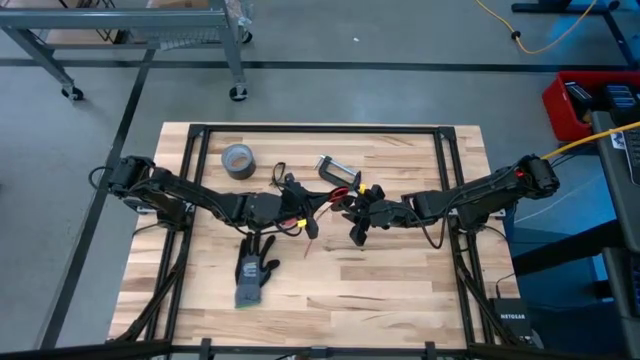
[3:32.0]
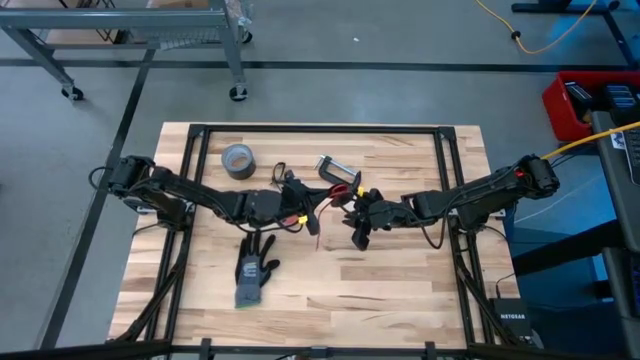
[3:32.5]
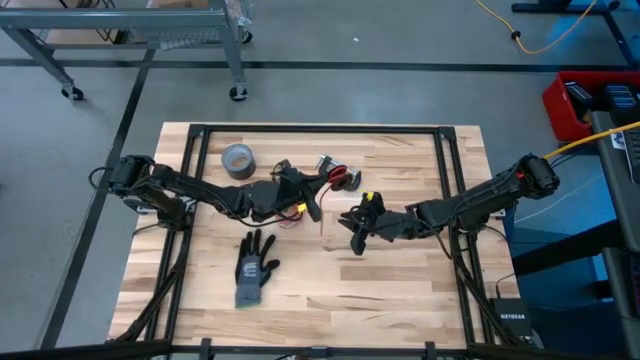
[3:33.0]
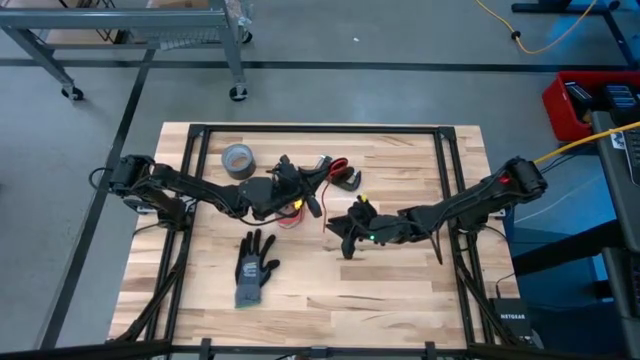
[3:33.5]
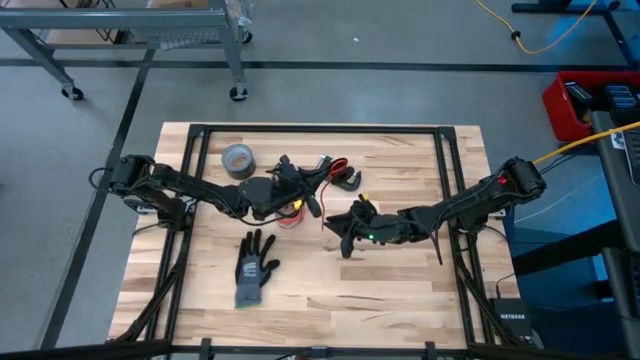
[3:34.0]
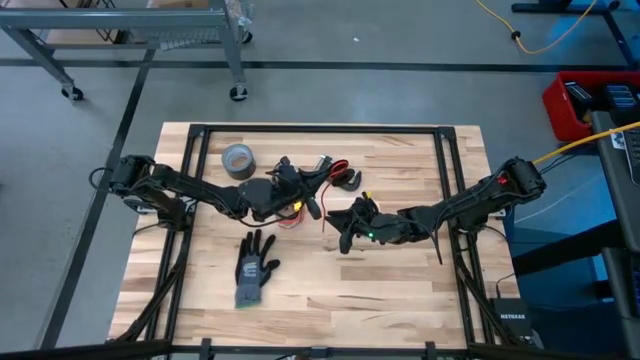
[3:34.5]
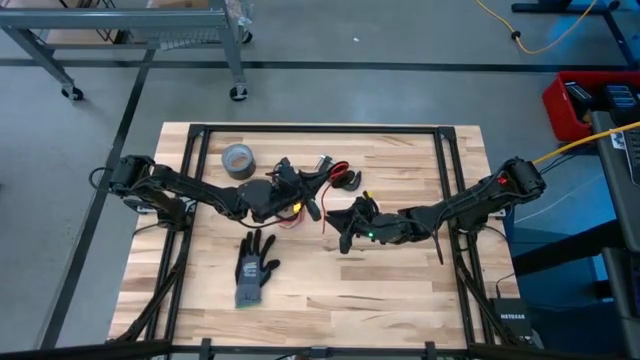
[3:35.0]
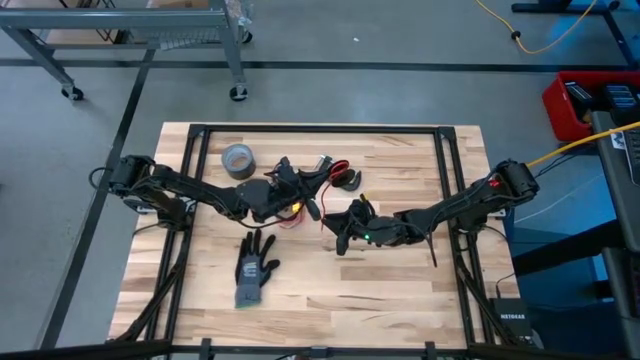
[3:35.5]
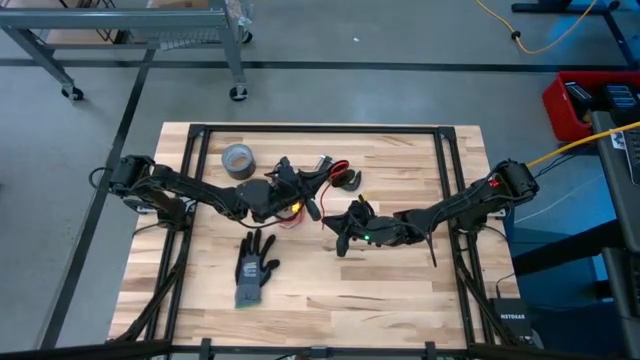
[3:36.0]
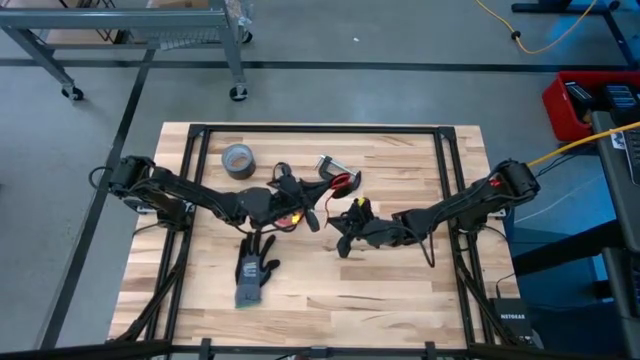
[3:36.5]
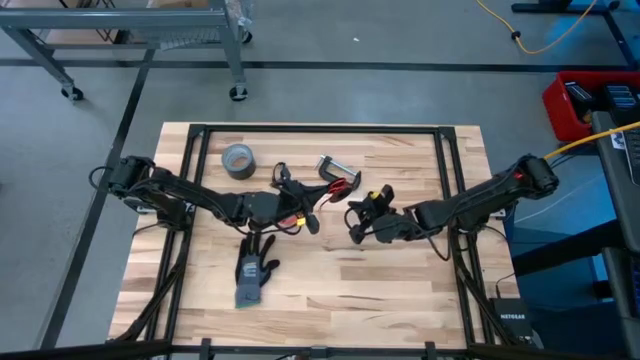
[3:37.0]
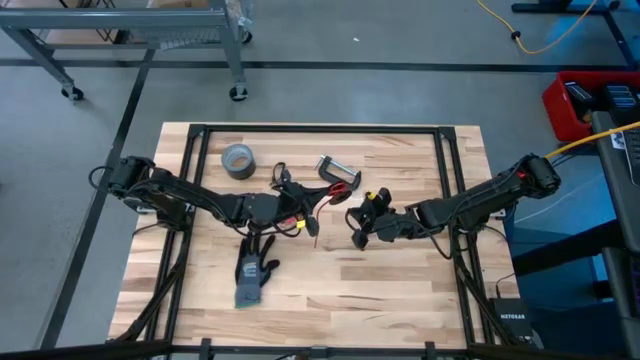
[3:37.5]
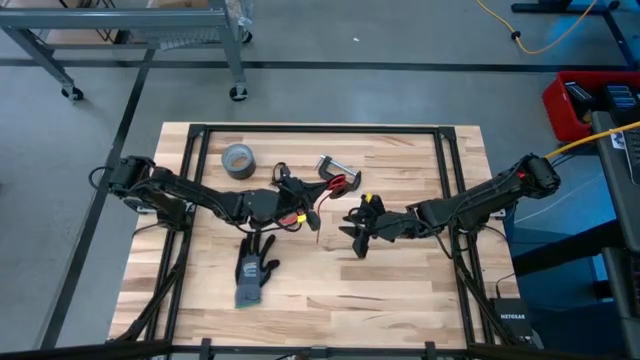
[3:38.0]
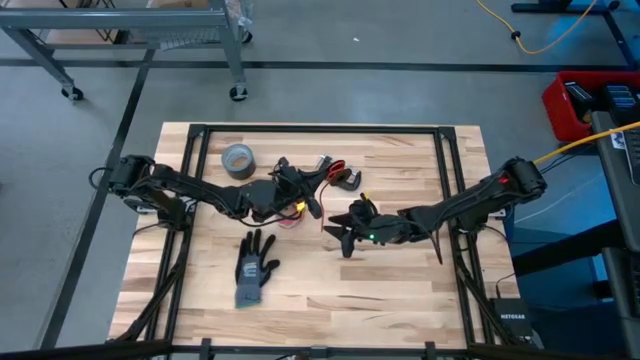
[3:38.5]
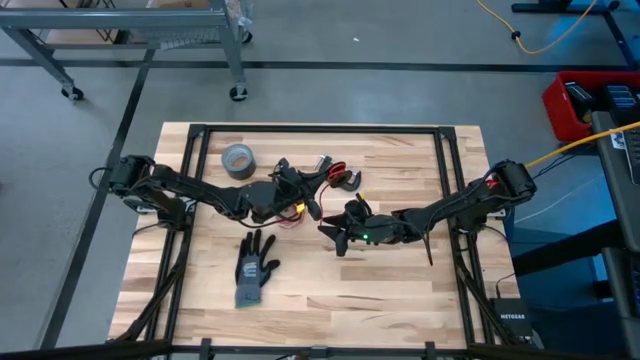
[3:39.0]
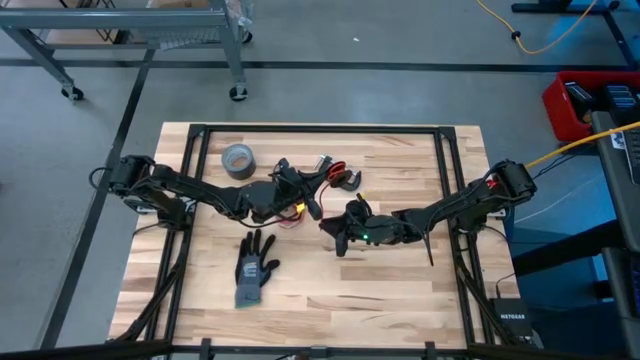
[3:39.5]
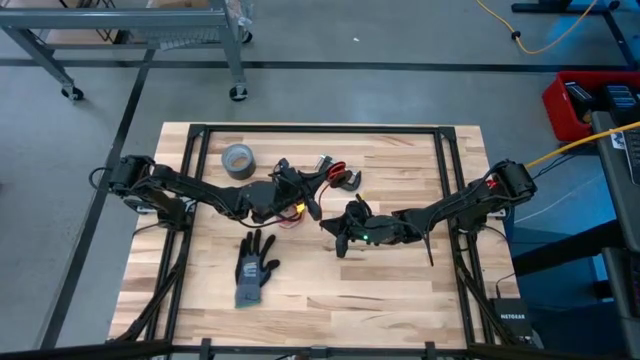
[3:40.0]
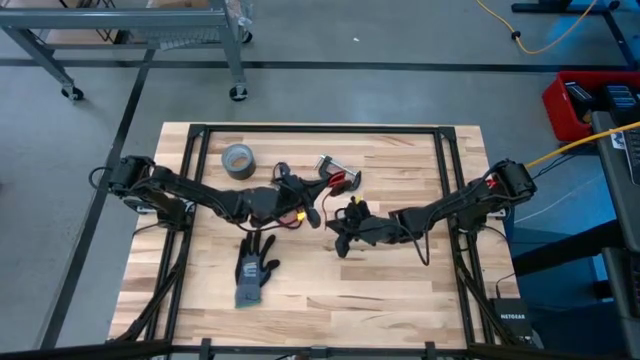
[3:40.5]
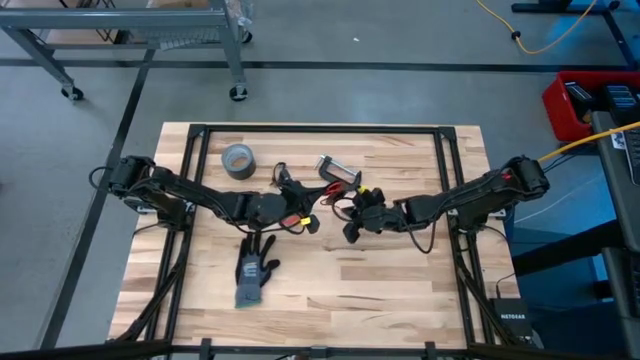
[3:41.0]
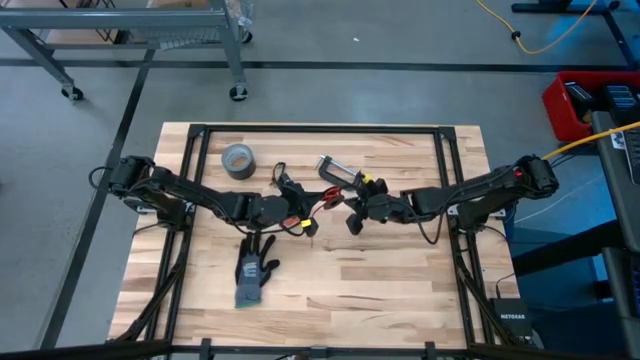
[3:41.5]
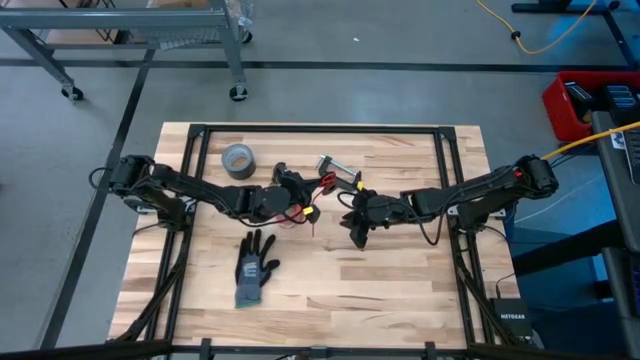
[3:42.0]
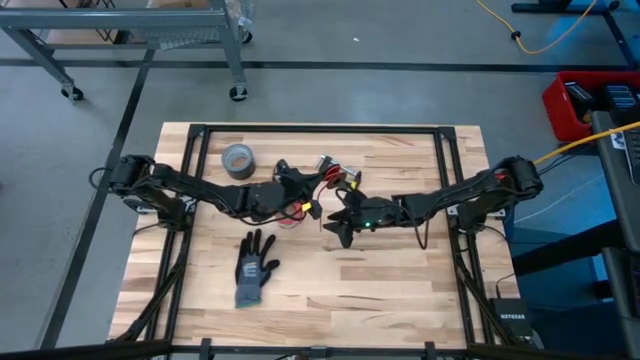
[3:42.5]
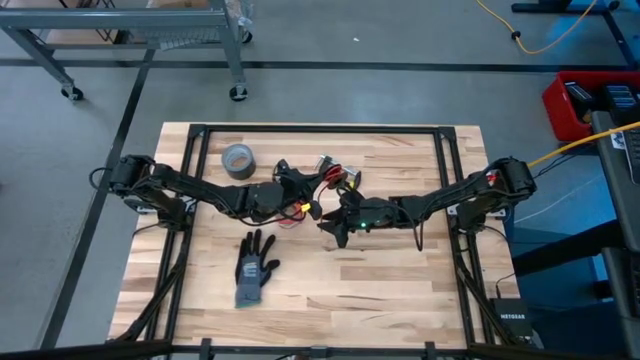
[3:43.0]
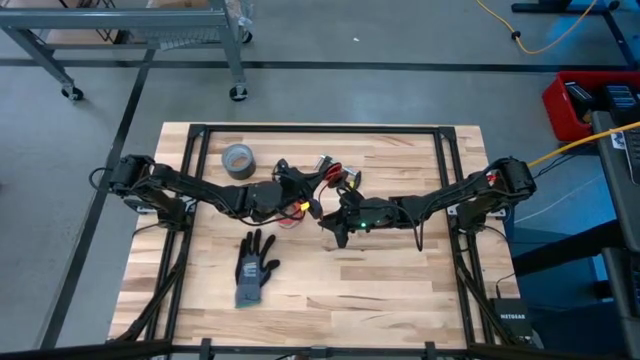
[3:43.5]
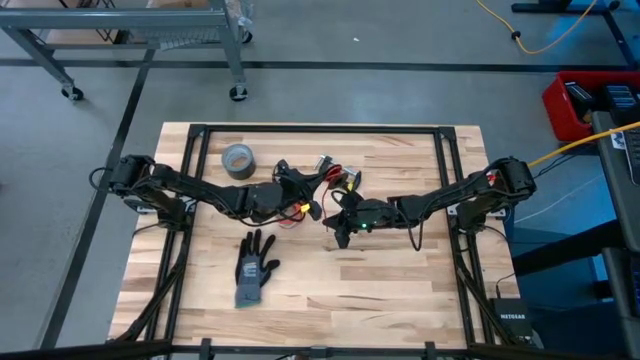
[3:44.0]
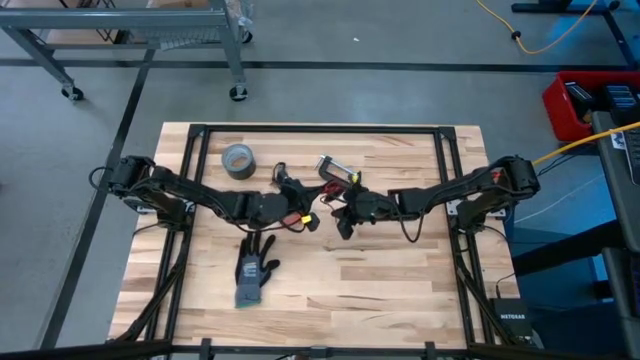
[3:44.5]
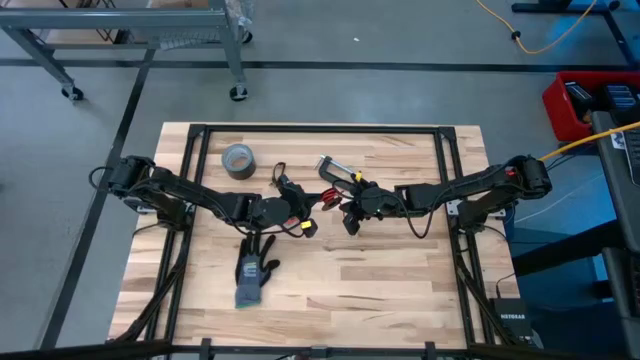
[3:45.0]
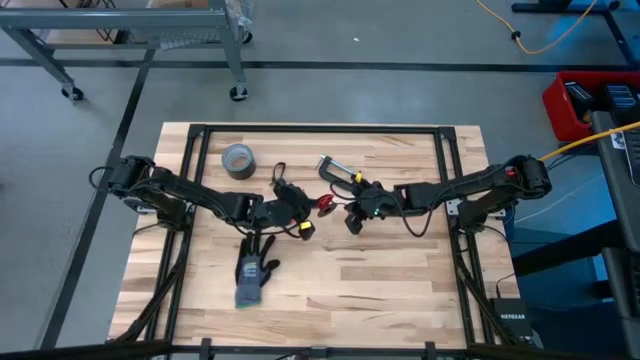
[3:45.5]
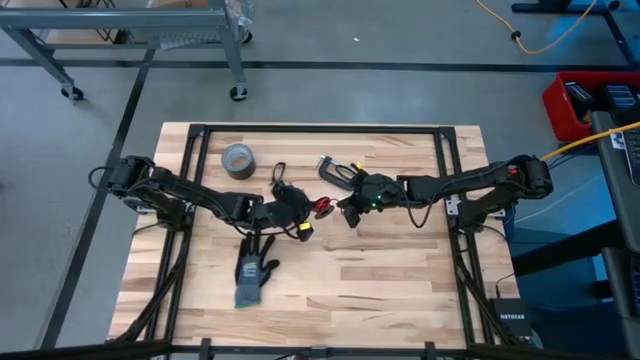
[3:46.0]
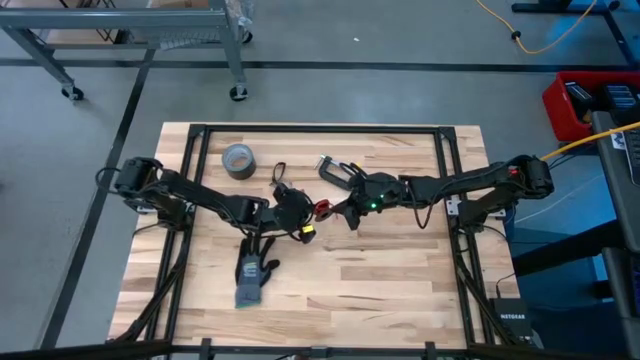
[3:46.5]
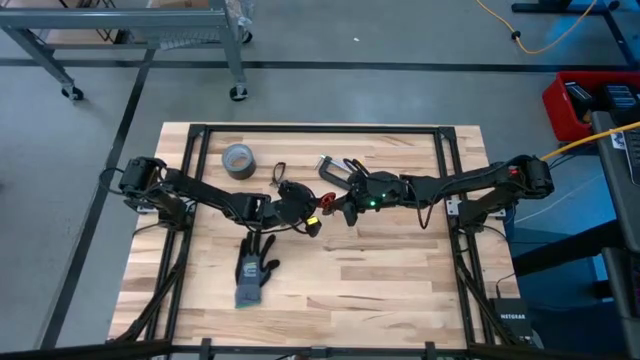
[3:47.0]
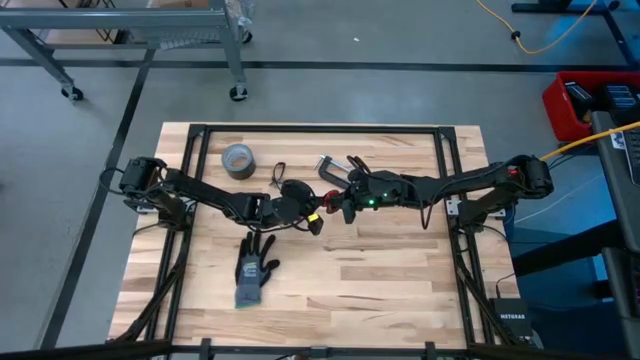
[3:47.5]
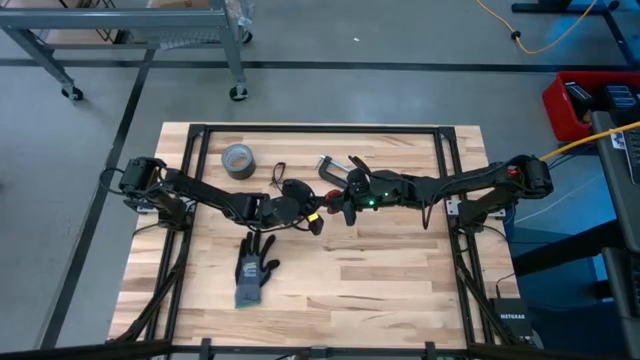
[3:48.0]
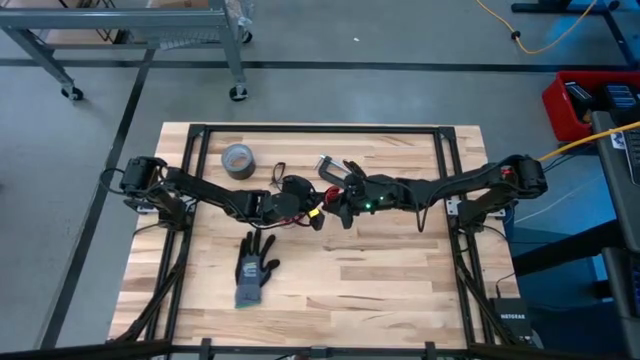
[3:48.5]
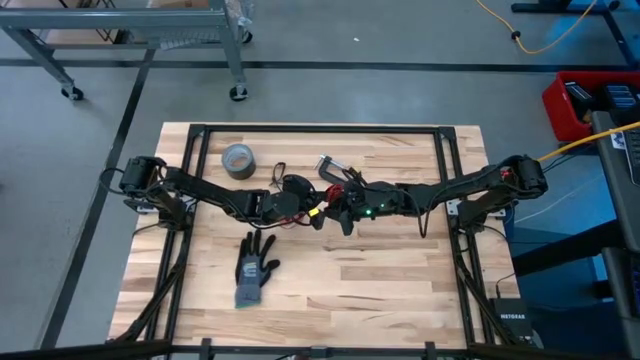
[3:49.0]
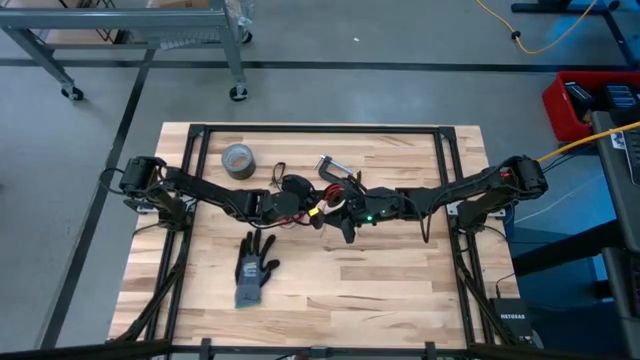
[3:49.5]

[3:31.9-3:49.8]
Task: Coil cords
Coil the red wire onto the spool

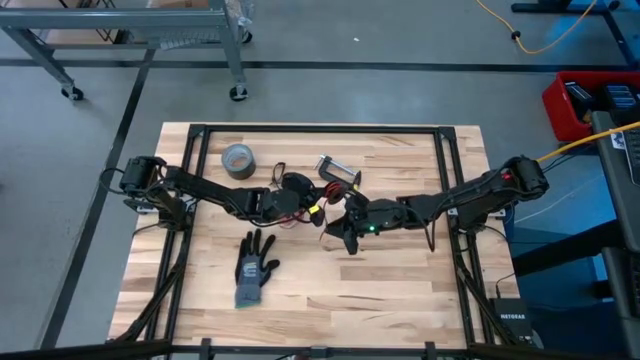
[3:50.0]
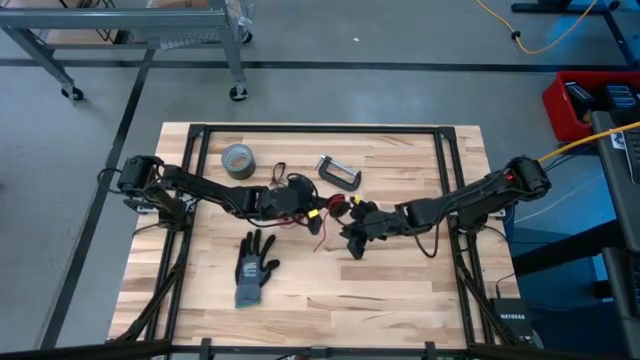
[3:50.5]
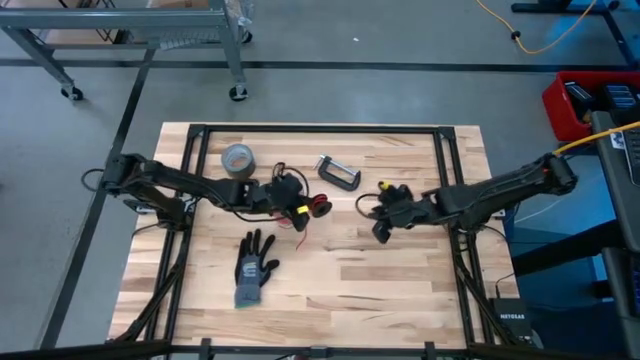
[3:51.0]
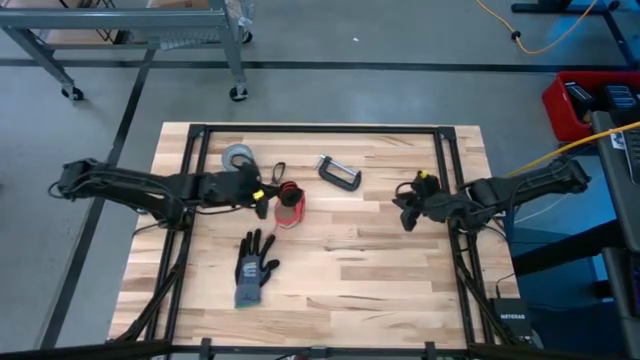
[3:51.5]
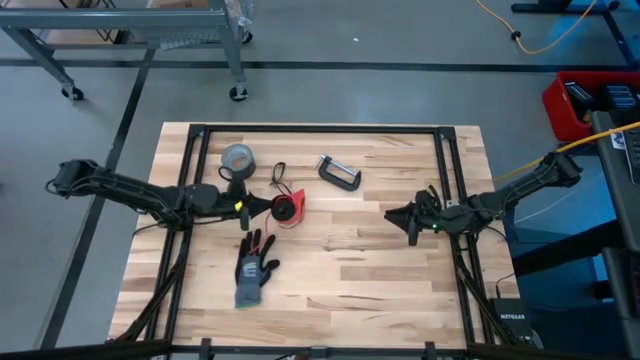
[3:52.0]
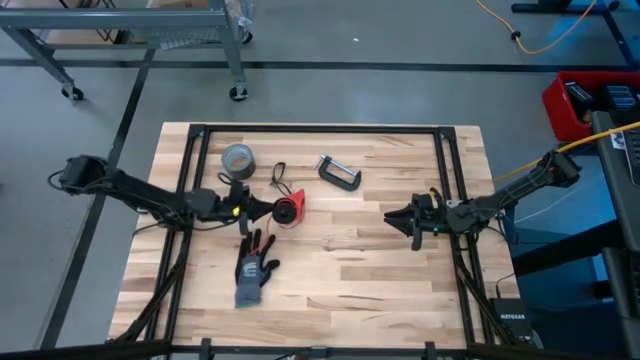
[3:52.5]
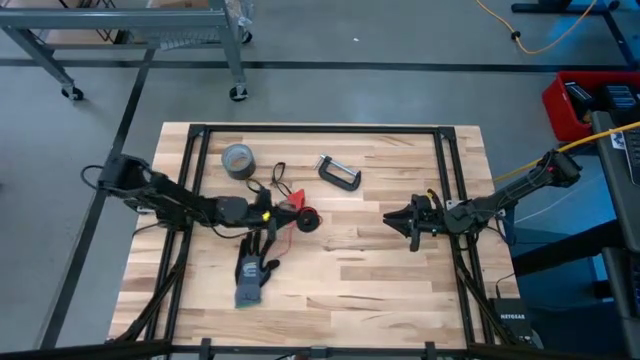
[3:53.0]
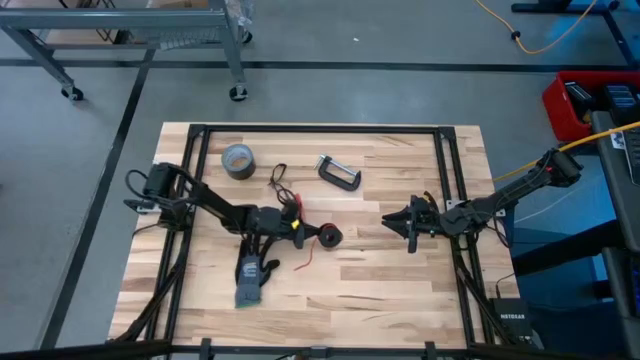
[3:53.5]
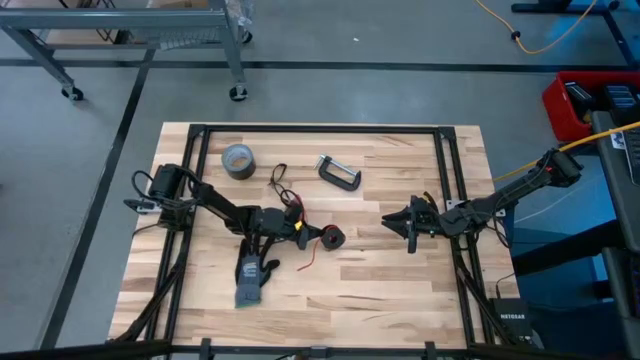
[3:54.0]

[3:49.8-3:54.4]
Coil the red wire onto the spool
